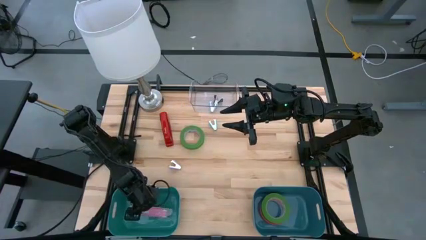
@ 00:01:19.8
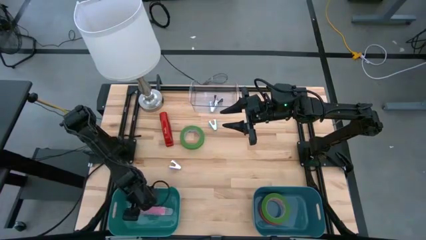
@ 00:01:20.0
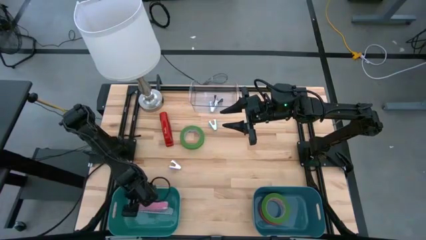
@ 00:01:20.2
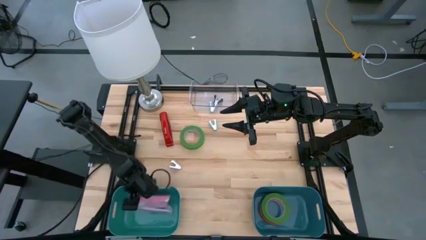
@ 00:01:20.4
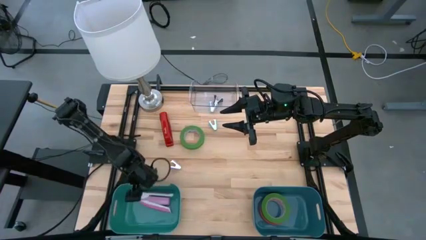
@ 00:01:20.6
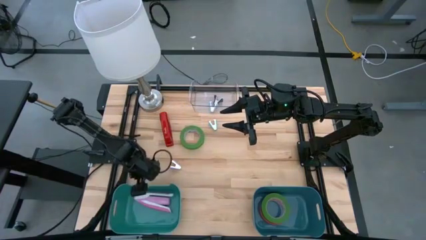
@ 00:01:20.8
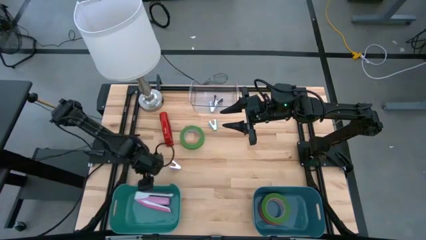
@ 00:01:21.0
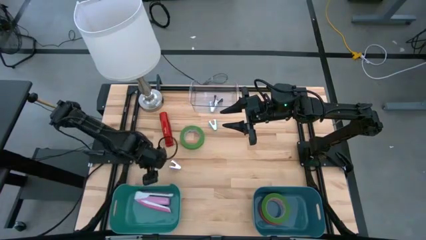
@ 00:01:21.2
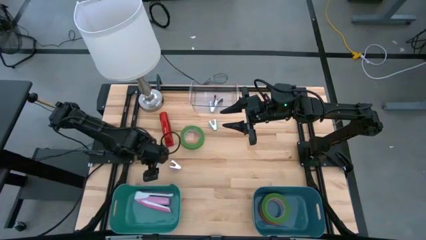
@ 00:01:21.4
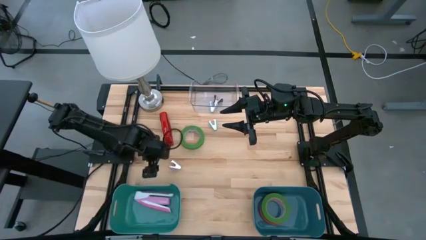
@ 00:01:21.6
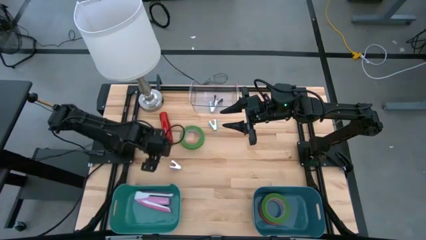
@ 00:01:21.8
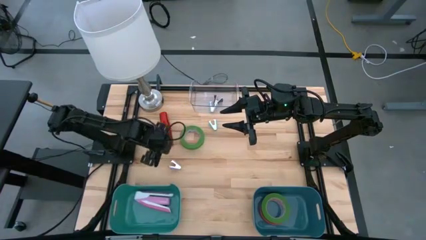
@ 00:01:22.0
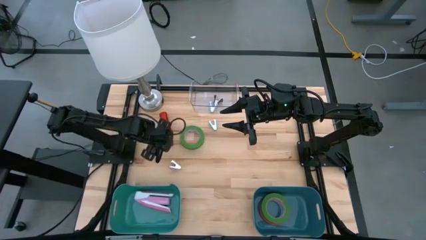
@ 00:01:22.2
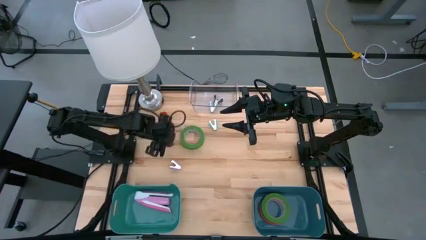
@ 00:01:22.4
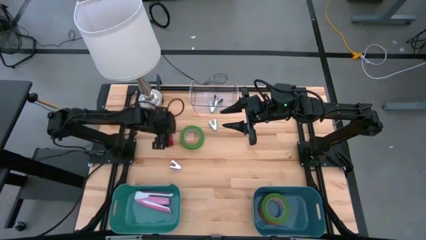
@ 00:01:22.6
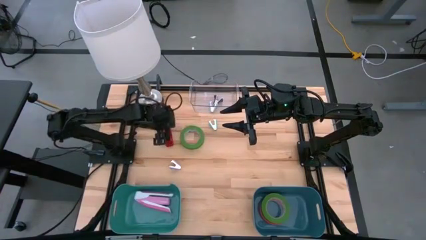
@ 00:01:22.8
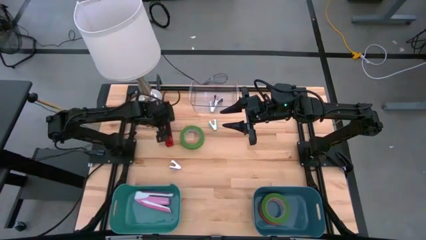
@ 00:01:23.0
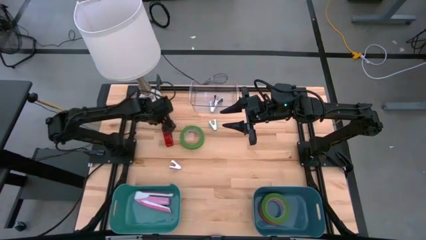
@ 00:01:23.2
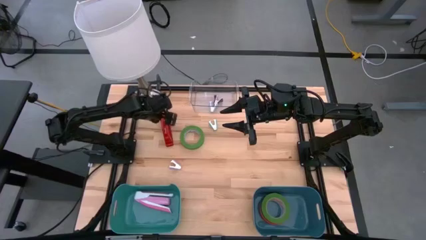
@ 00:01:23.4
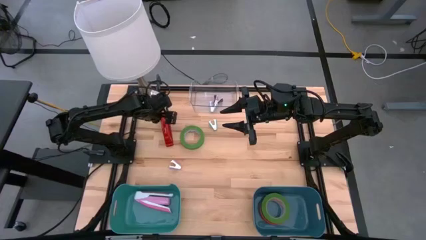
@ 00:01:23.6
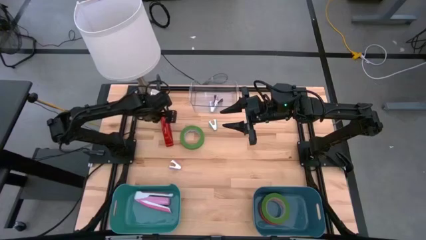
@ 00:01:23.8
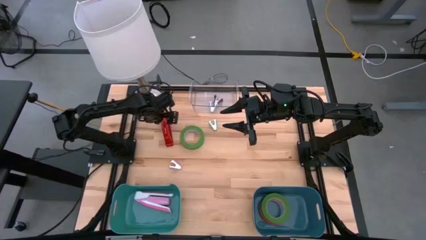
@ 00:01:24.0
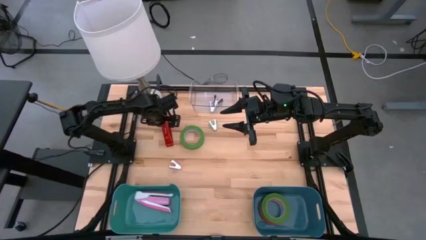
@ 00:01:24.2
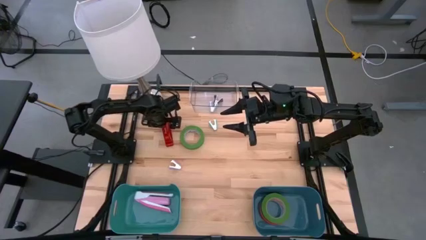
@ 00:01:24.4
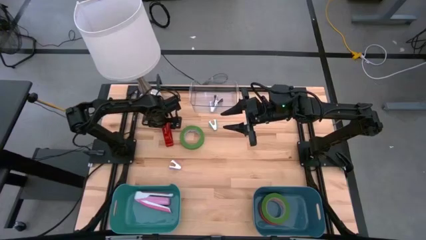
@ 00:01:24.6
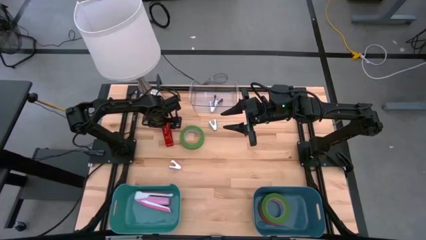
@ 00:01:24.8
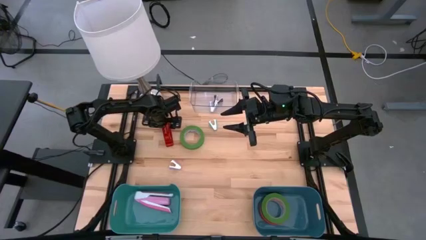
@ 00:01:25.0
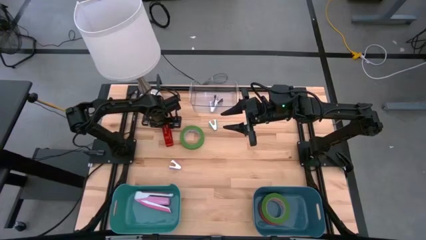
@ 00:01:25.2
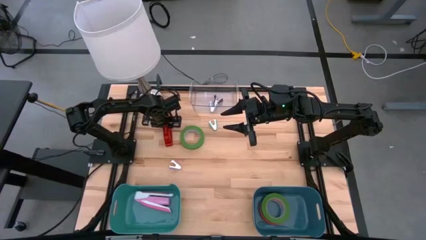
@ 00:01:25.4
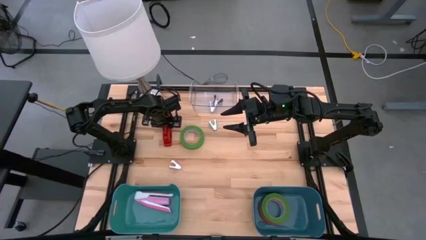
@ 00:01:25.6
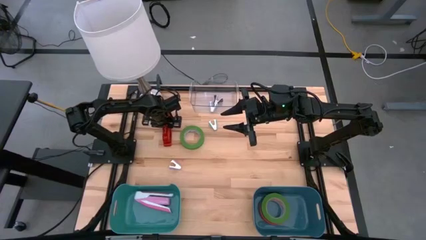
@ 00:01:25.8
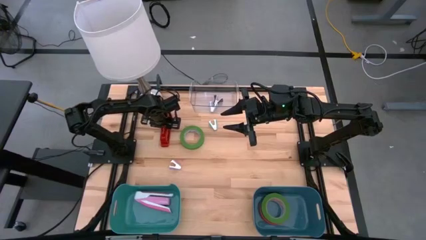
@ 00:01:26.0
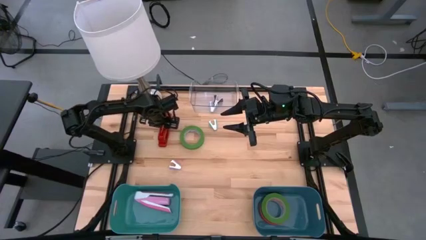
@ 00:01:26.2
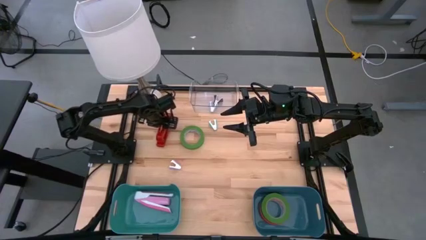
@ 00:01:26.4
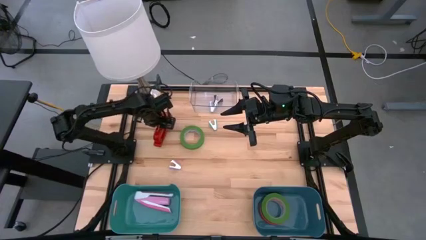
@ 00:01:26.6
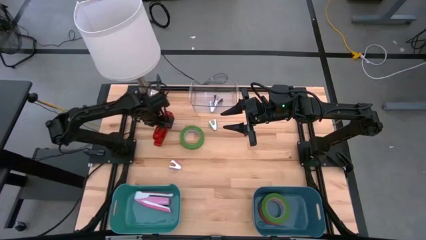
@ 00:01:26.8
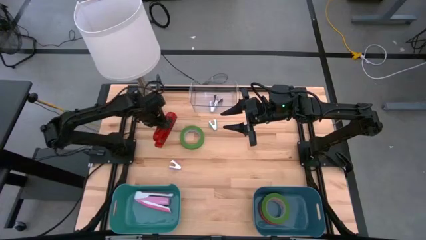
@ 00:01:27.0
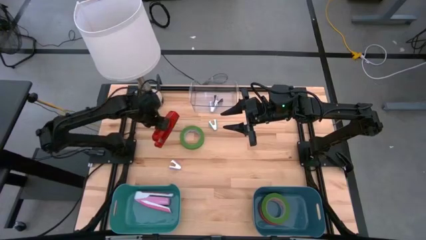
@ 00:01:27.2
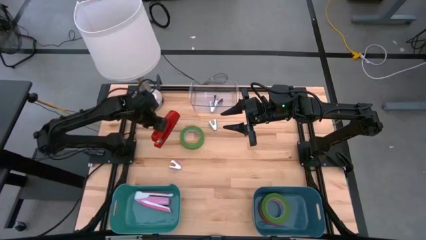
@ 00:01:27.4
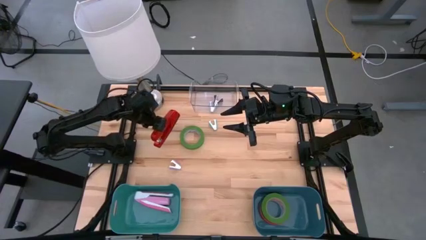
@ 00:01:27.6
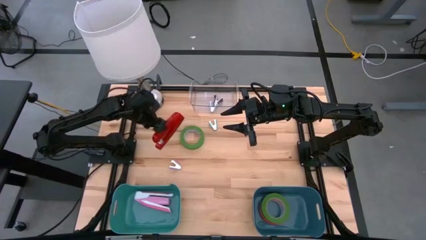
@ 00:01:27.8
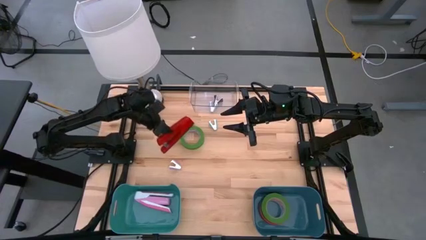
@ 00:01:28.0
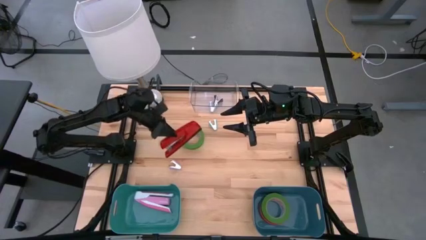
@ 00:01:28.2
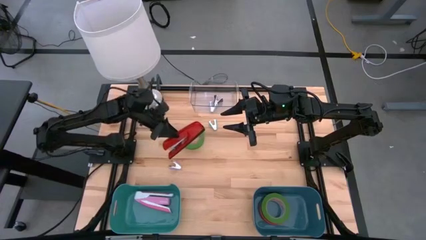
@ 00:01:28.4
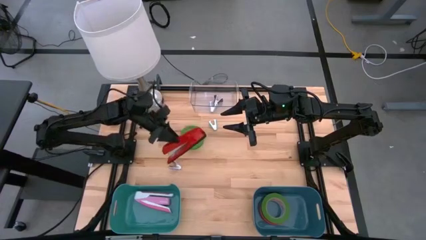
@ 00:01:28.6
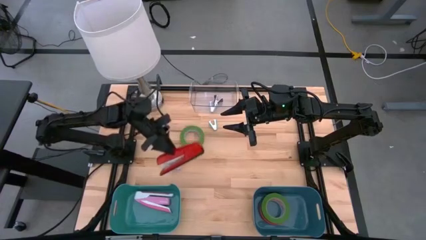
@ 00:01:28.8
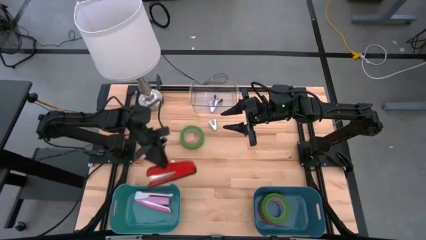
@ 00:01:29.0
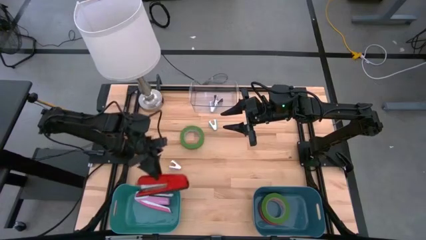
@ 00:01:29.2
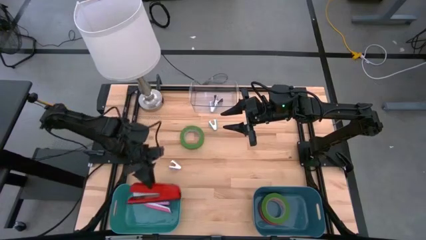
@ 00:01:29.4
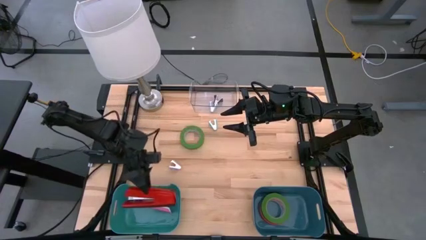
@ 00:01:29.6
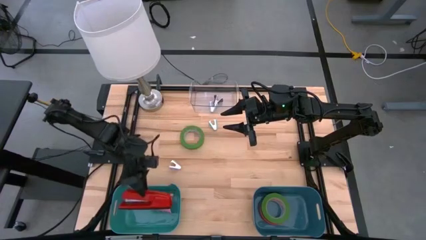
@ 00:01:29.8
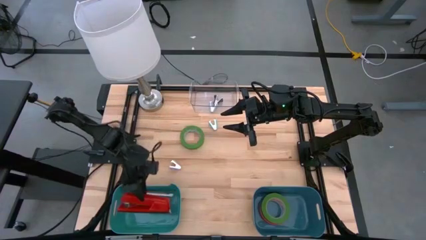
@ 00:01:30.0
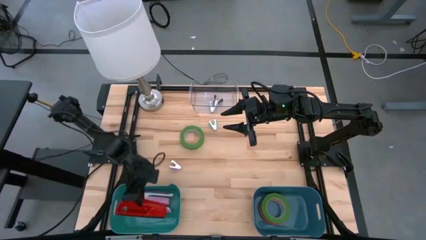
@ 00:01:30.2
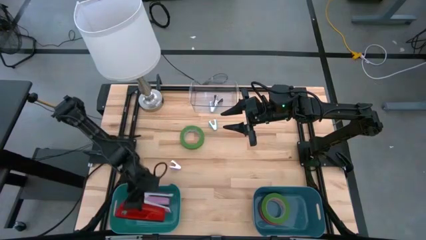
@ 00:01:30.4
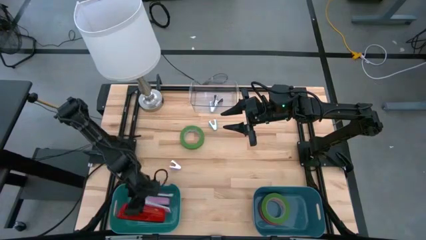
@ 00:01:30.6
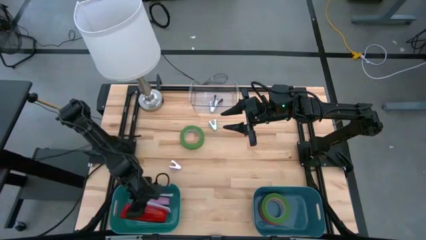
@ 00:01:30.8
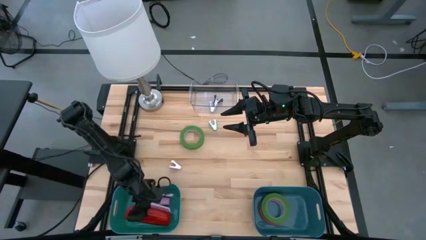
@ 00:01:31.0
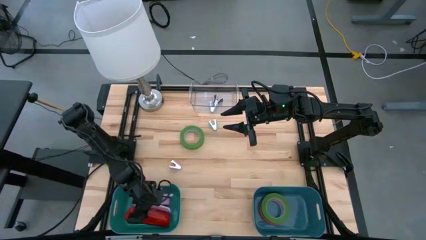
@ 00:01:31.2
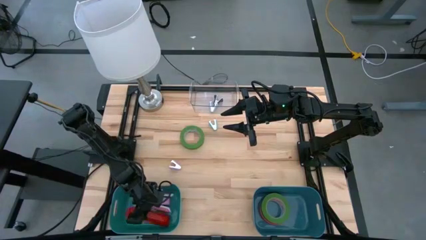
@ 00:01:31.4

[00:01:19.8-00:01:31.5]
Task: Pick and place Stapler, Stapler remover, tape
Put the red stapler into the green bin
